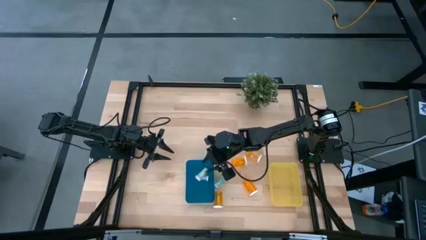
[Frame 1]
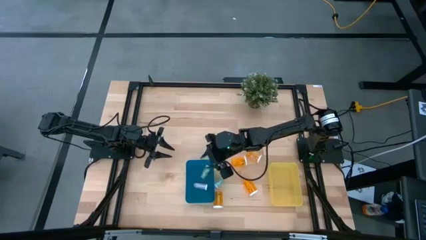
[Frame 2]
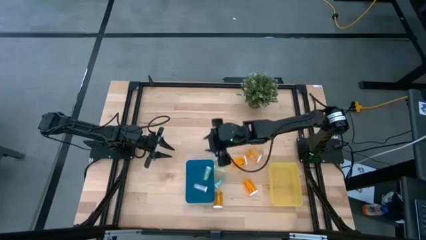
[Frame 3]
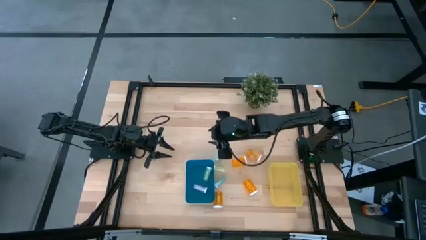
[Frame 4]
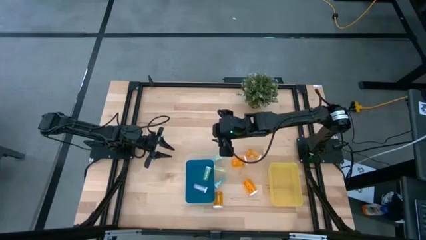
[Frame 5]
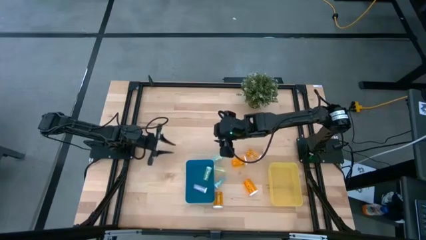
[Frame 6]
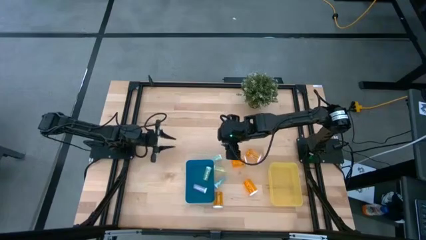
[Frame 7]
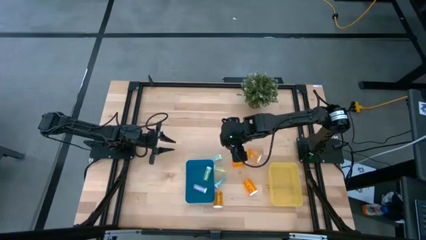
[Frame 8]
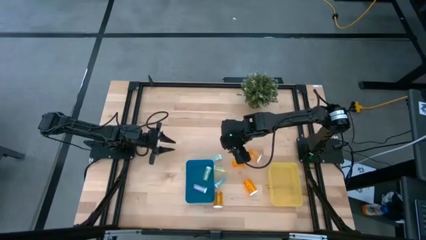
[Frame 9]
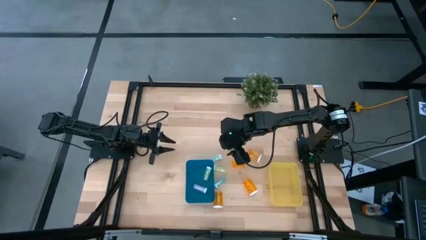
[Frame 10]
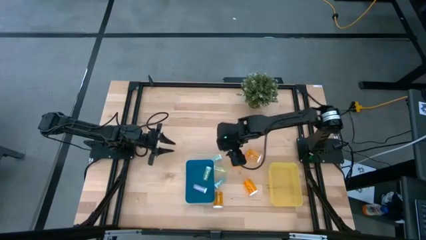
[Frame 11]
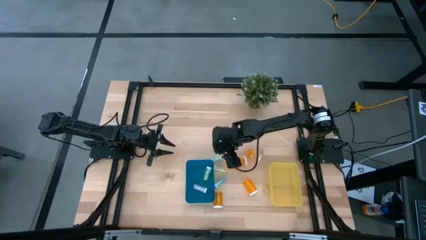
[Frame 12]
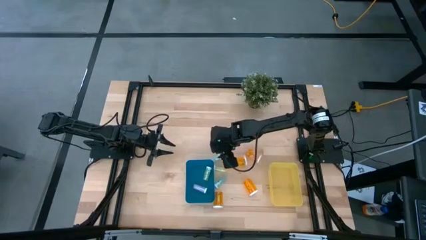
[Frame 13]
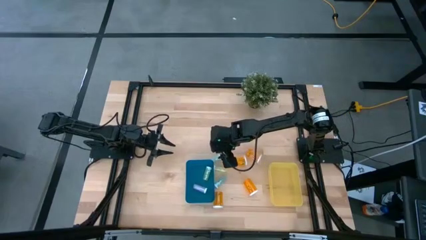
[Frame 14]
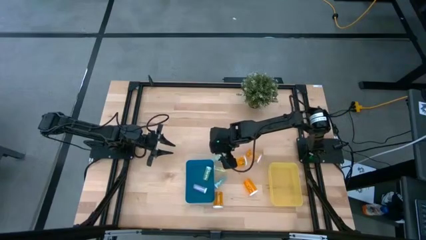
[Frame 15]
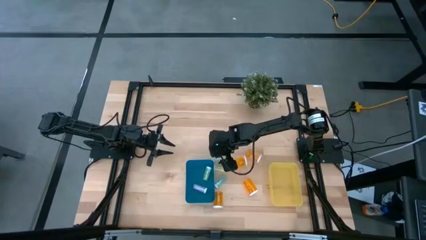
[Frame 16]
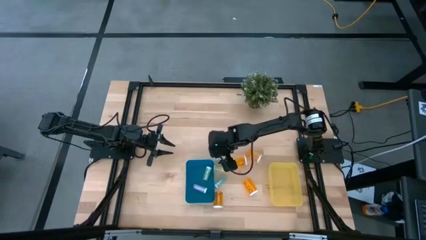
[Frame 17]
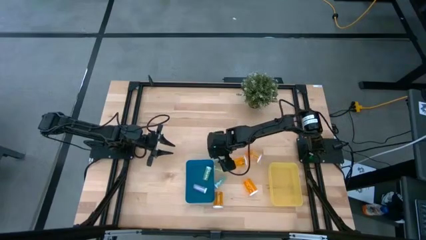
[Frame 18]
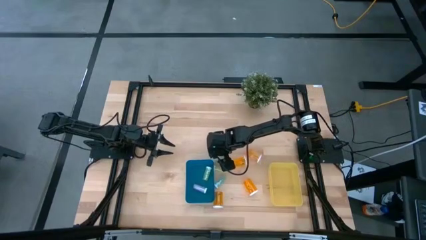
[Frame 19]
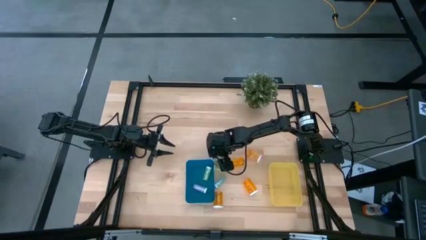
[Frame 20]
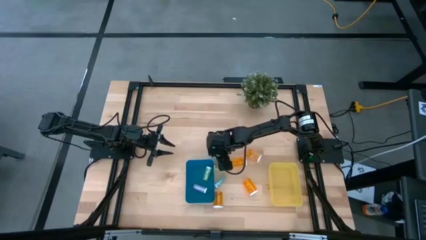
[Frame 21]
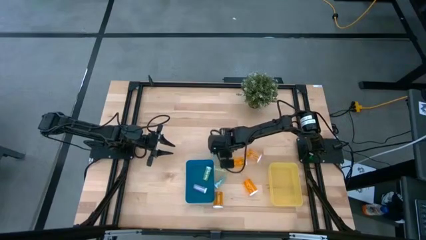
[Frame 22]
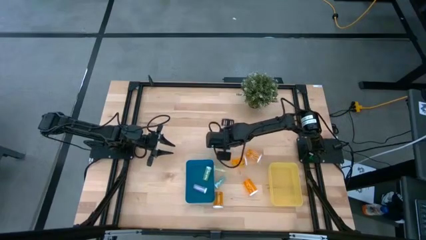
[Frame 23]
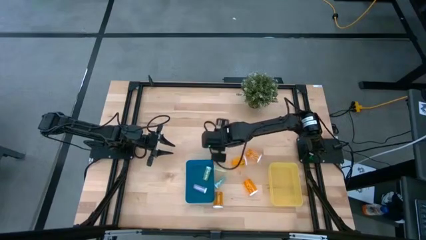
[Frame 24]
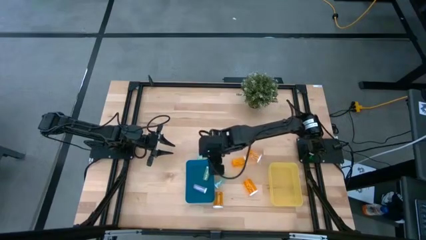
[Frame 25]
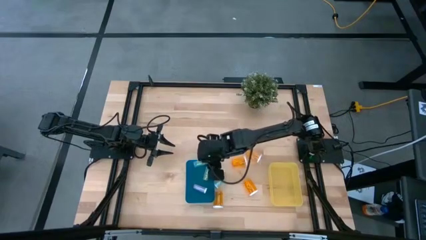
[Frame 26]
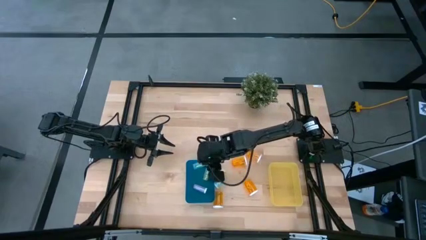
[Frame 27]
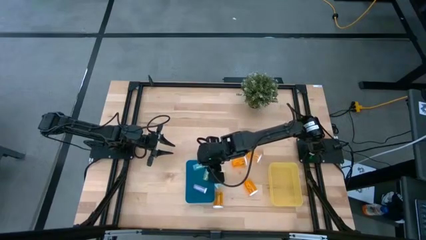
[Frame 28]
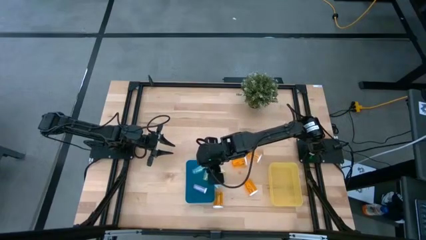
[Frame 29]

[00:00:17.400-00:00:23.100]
Task: Pick and place medicine bottles into bin by pill shape (circle, oval)
Put the small blue pill bottle into the blue bin

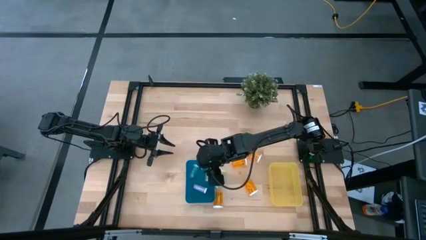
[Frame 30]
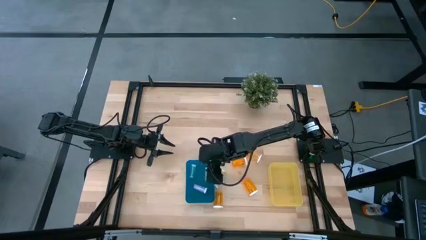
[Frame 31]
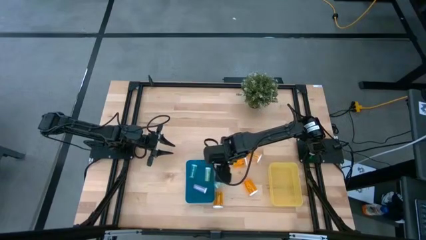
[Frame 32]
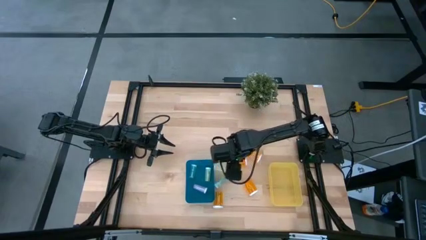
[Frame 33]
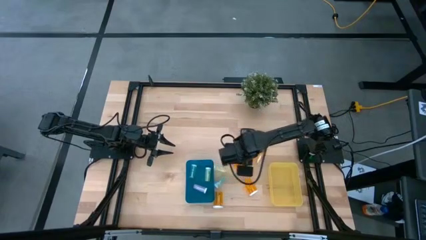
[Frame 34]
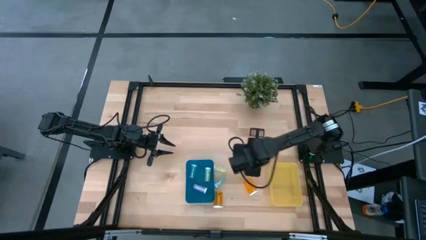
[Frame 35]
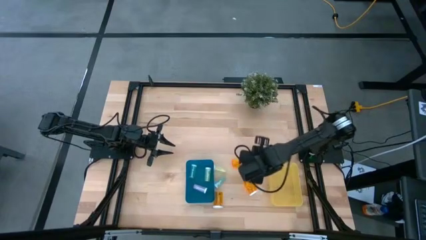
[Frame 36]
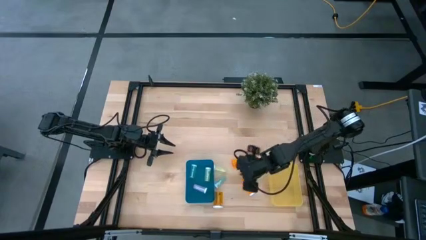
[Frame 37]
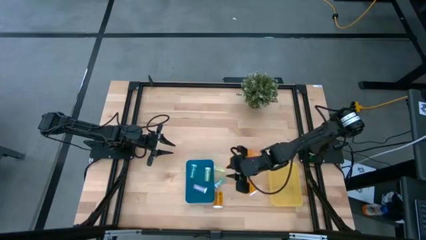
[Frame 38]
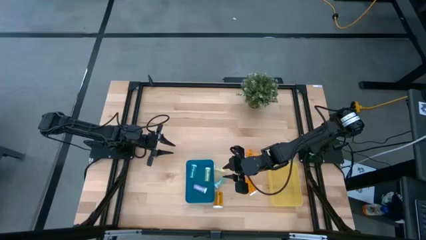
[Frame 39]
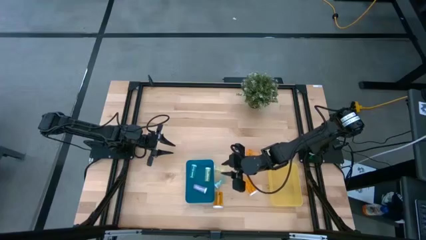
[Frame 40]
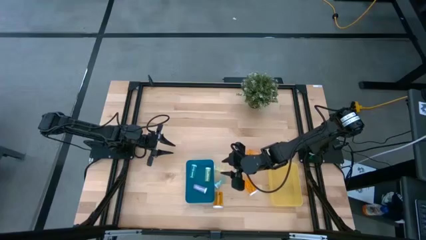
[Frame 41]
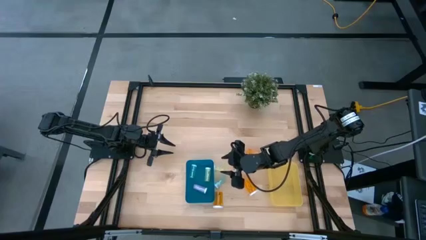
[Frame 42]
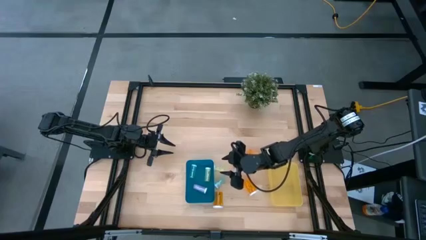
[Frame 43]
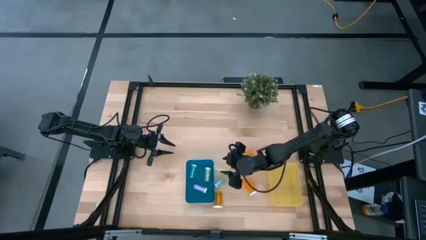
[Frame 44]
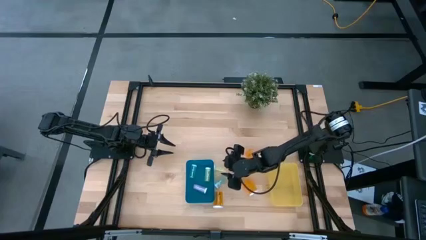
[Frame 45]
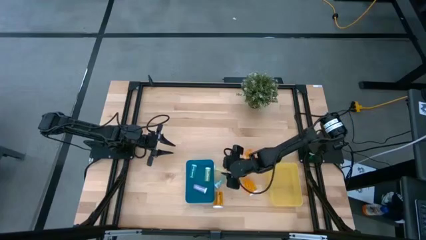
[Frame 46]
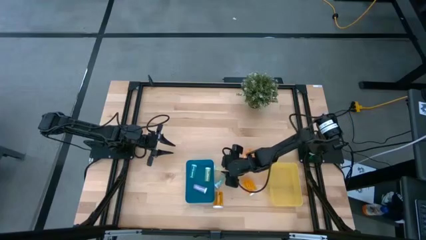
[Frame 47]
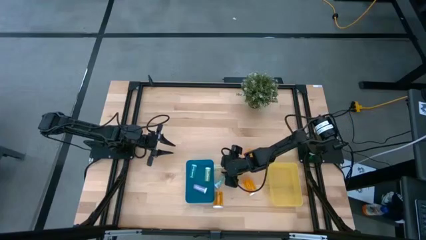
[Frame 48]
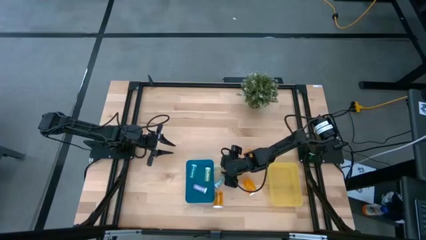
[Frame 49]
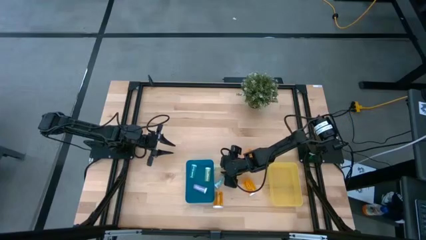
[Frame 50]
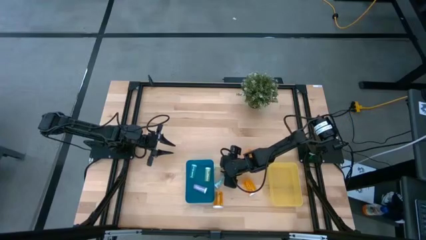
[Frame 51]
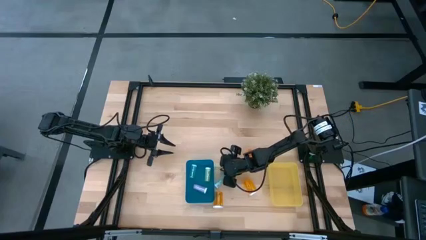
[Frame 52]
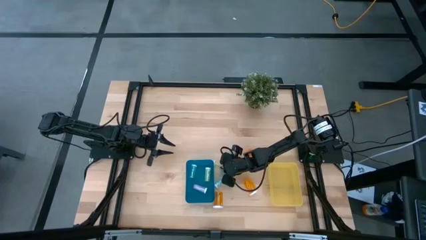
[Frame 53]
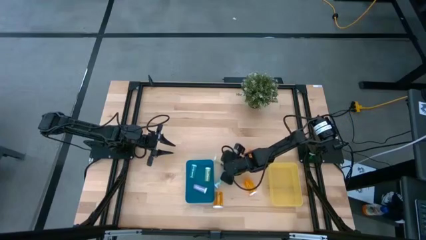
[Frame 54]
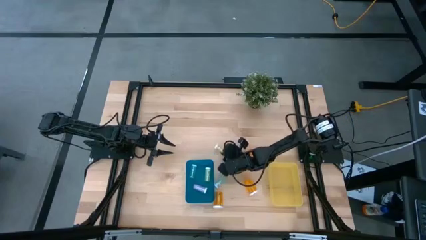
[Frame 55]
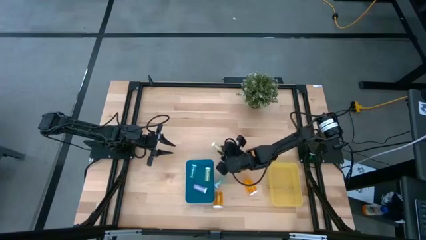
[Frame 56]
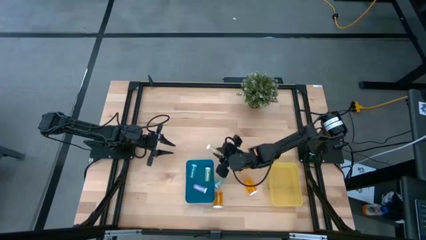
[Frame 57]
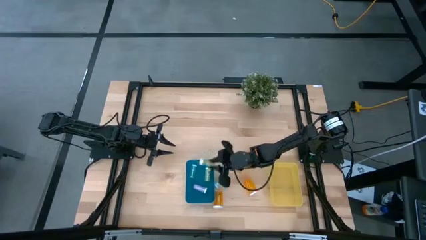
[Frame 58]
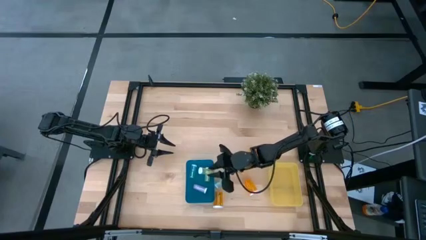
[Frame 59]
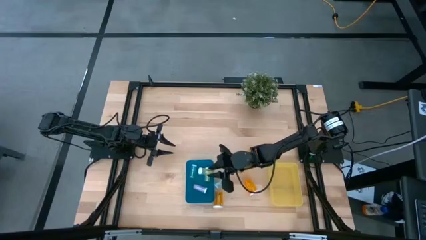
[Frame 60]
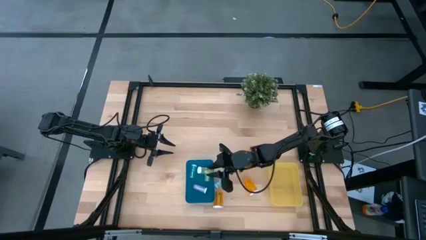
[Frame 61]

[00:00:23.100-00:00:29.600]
Put the small yellow pill bottle into the blue bin

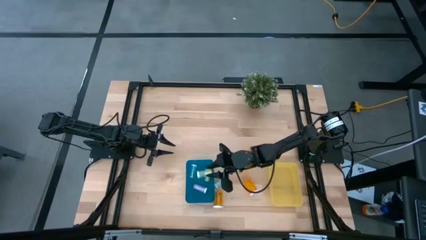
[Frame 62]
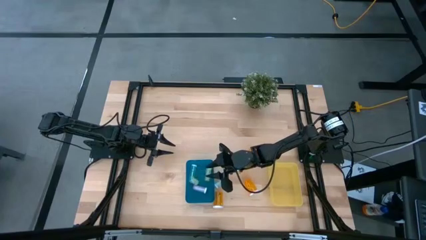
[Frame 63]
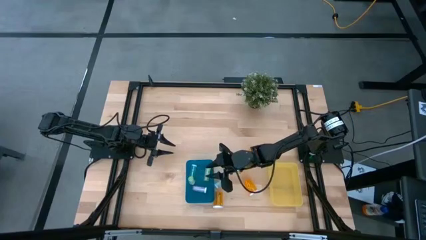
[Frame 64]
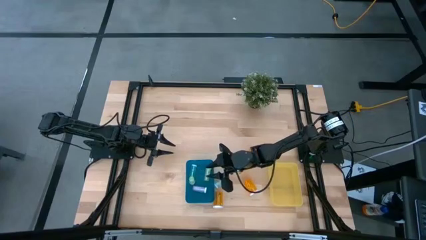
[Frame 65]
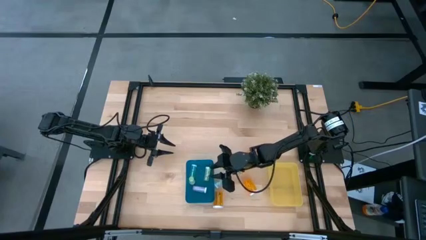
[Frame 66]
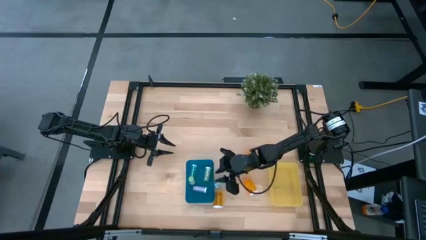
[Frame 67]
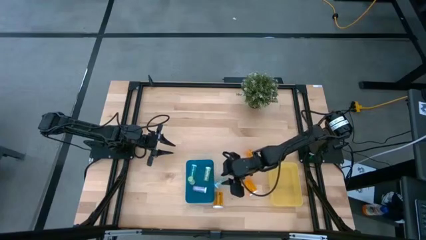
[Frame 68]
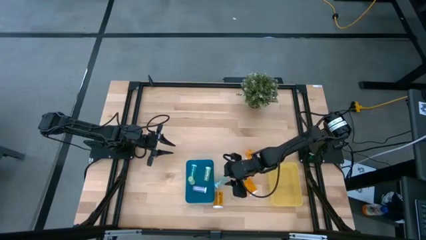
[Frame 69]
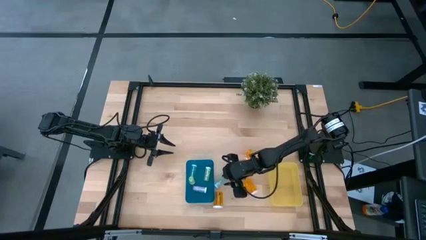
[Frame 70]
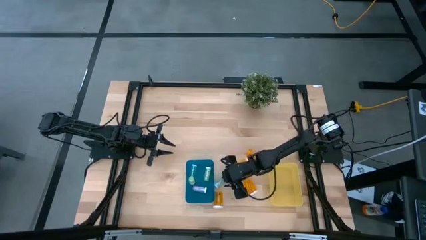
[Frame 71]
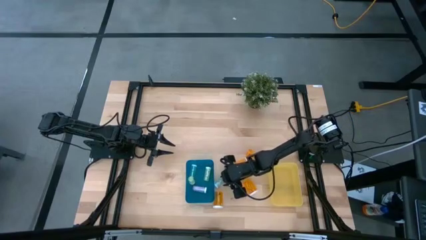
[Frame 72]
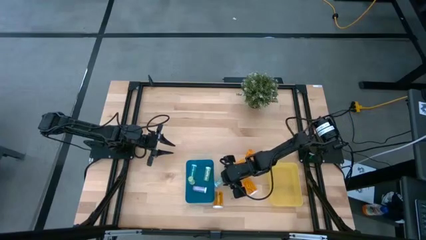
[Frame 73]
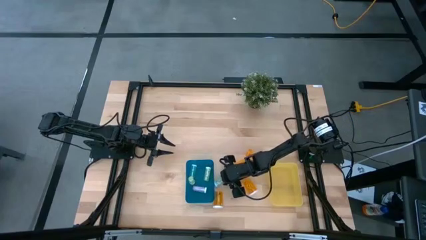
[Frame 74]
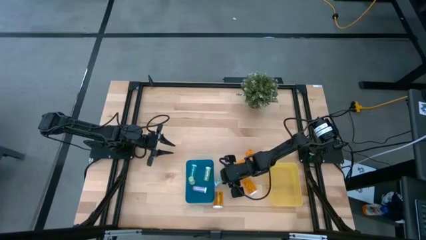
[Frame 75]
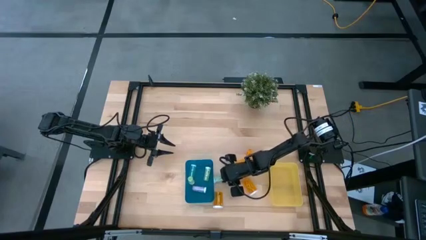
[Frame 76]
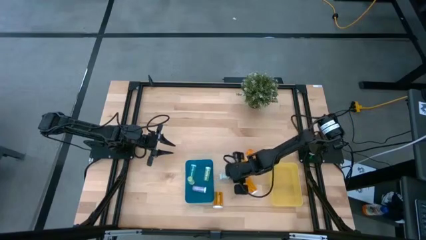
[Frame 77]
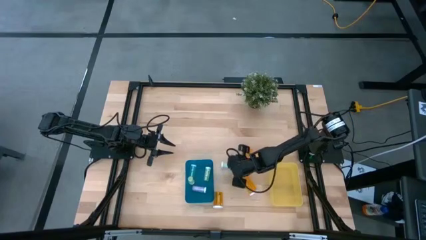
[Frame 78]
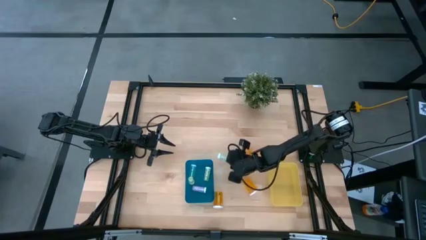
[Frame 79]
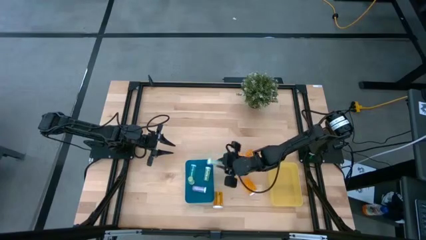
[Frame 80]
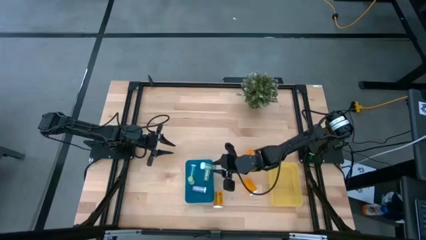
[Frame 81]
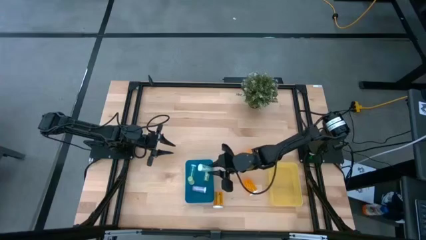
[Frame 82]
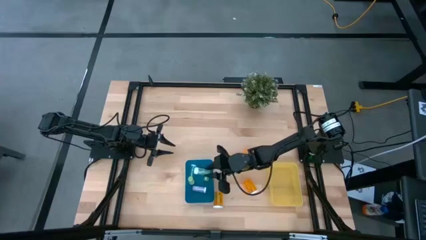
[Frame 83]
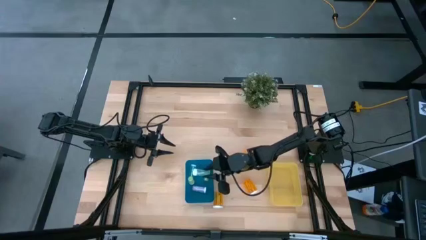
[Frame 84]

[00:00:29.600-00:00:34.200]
Put the small blue pill bottle into the blue bin

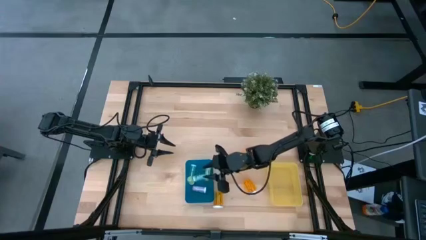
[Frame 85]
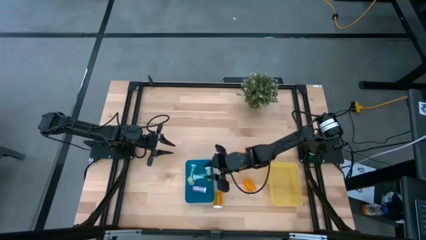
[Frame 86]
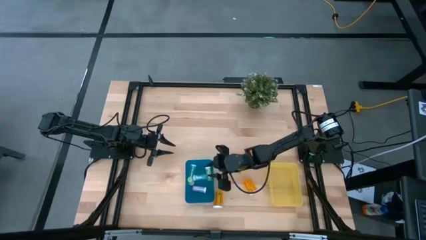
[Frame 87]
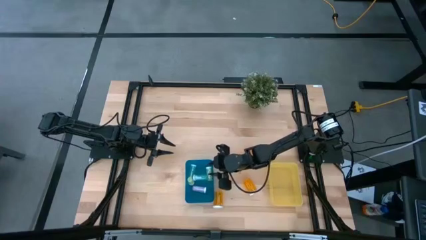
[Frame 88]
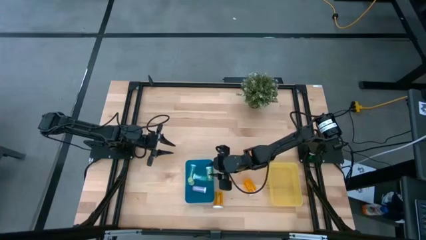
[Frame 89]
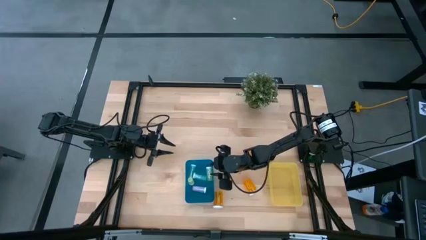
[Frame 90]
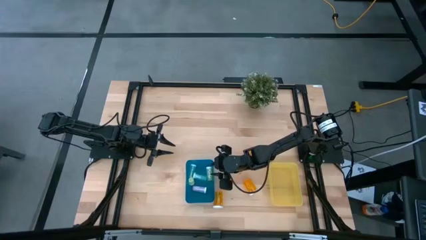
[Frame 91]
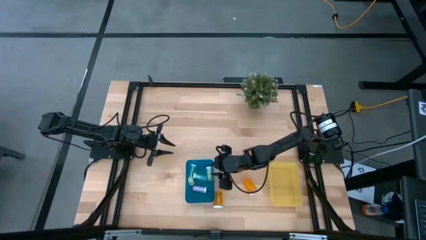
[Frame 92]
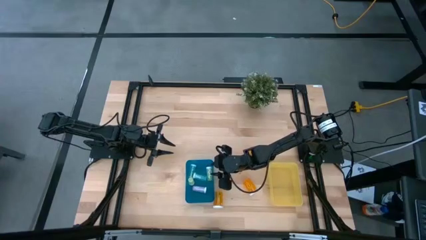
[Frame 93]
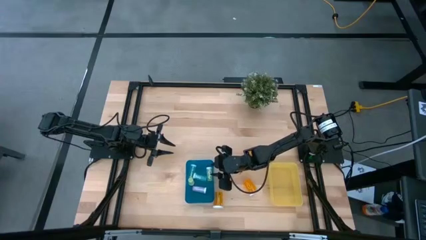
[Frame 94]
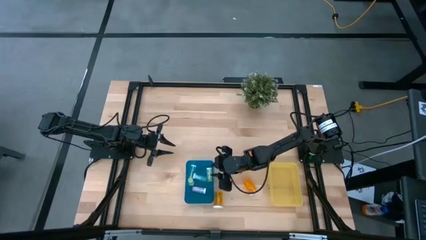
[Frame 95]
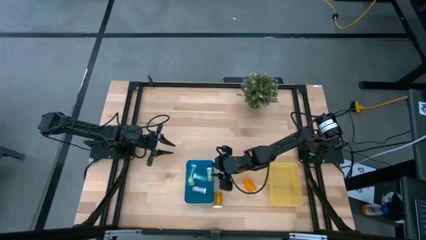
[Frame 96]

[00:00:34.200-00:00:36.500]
Adjust the blue bin
